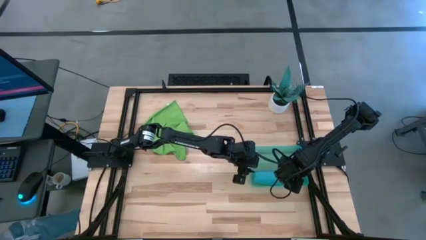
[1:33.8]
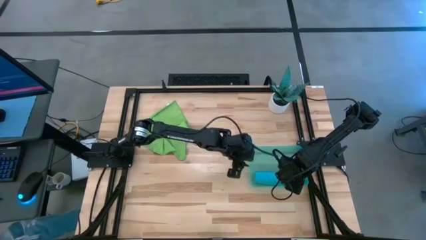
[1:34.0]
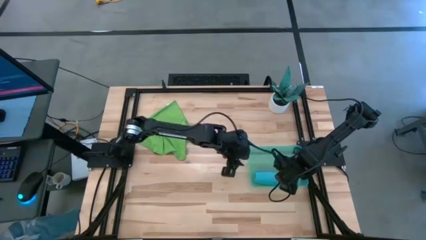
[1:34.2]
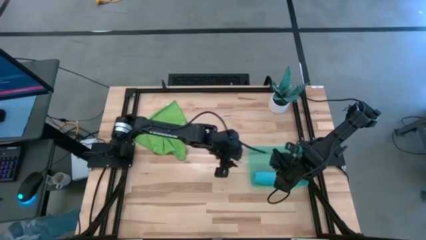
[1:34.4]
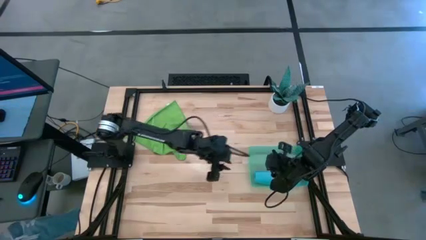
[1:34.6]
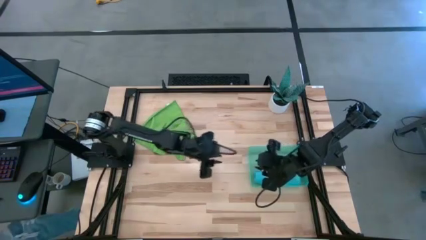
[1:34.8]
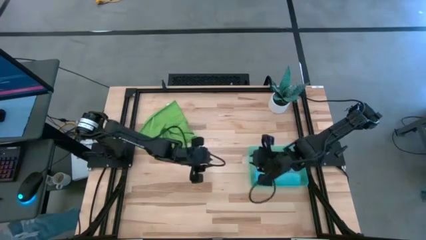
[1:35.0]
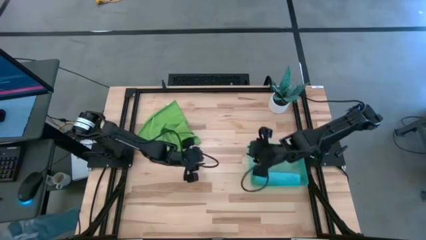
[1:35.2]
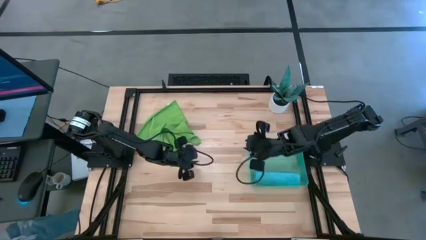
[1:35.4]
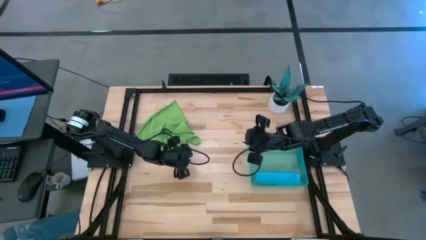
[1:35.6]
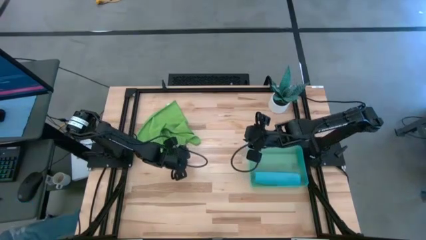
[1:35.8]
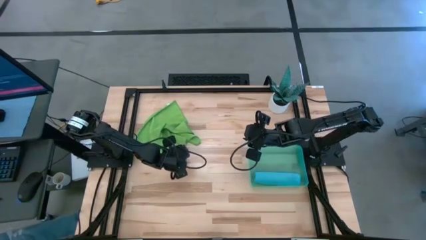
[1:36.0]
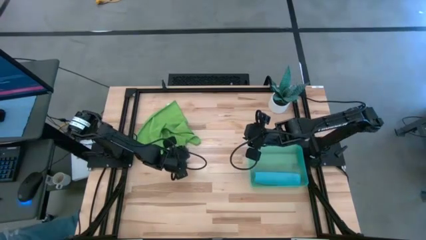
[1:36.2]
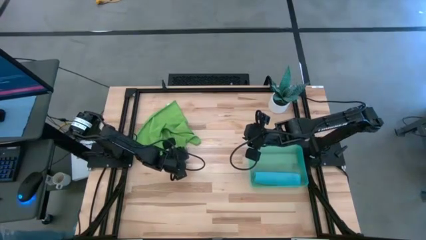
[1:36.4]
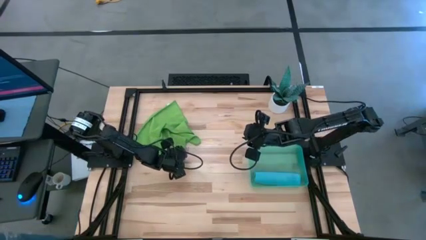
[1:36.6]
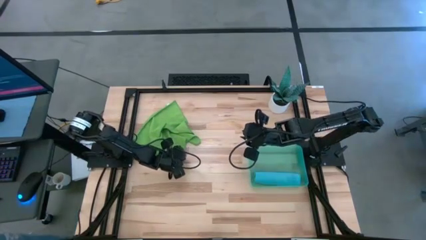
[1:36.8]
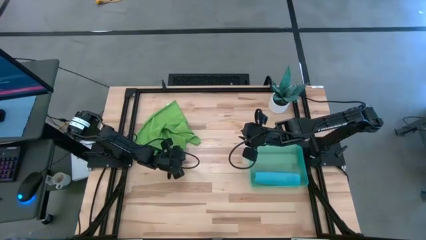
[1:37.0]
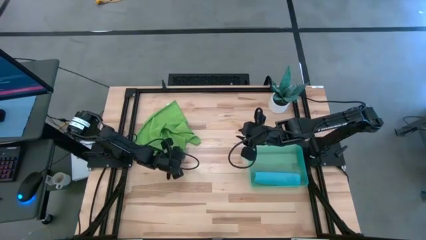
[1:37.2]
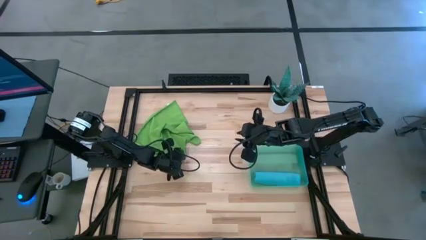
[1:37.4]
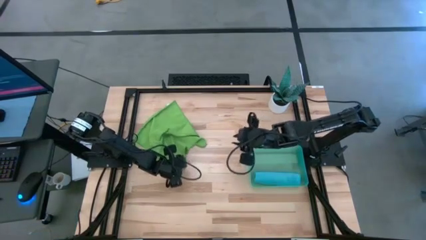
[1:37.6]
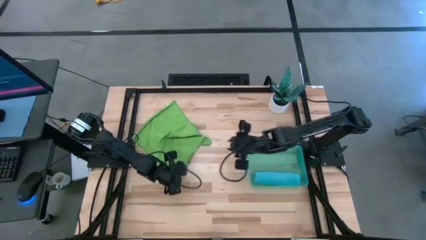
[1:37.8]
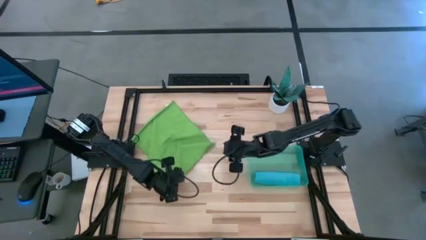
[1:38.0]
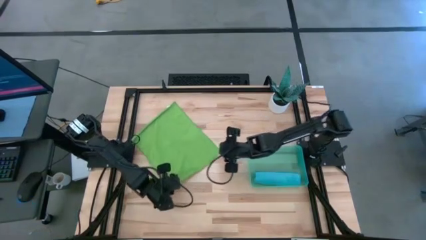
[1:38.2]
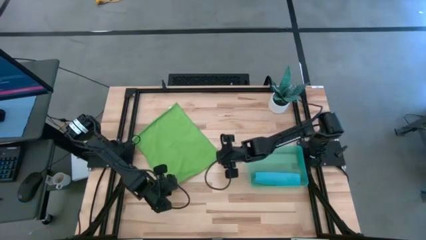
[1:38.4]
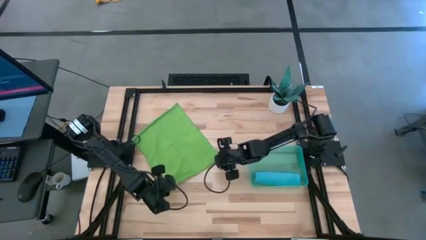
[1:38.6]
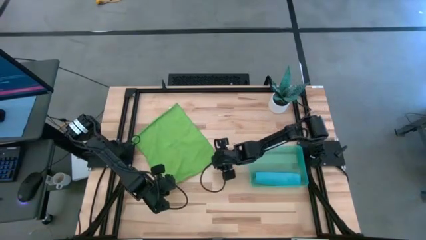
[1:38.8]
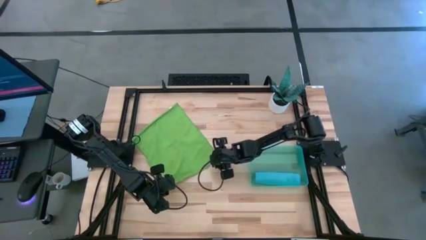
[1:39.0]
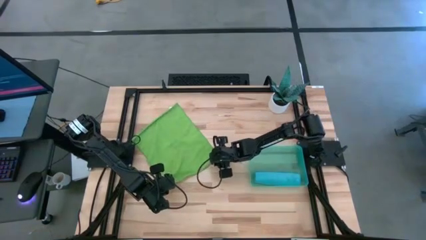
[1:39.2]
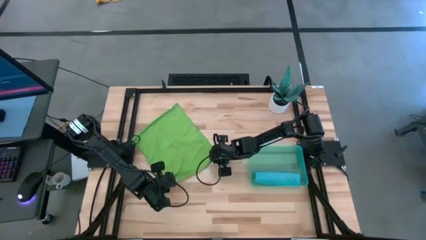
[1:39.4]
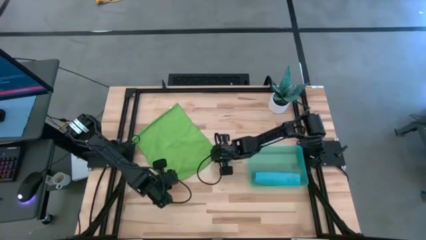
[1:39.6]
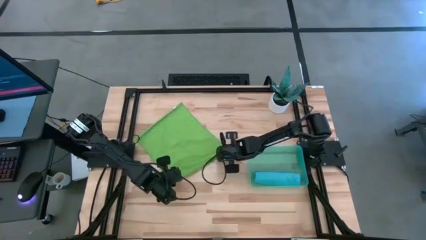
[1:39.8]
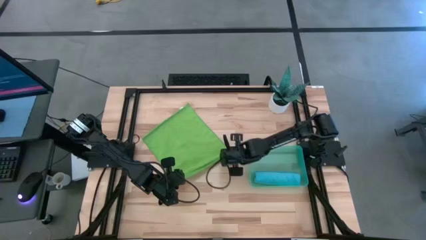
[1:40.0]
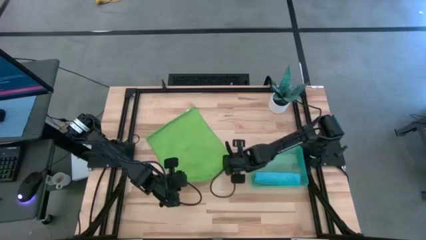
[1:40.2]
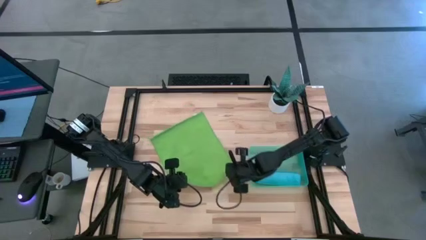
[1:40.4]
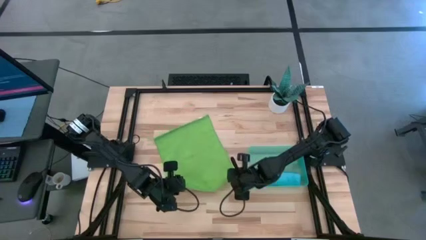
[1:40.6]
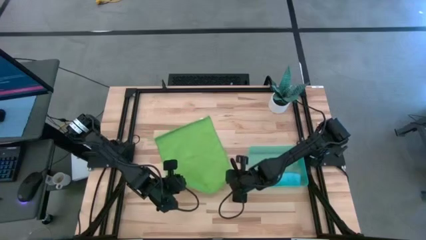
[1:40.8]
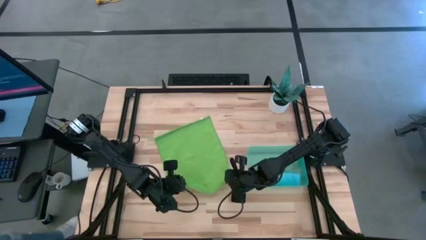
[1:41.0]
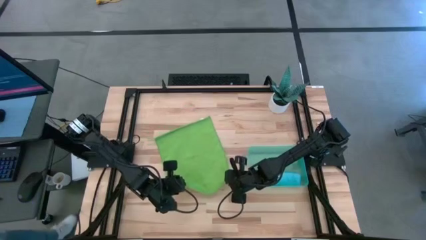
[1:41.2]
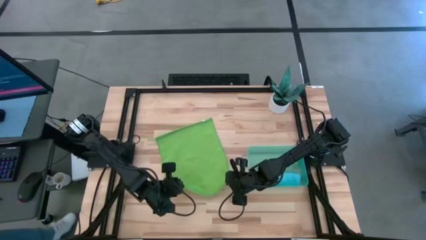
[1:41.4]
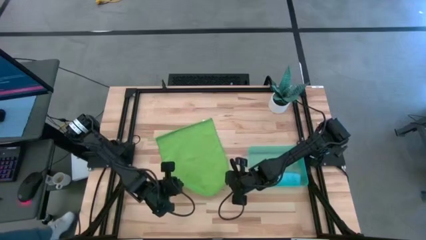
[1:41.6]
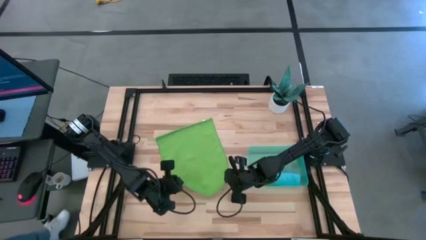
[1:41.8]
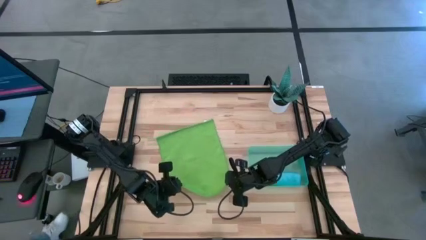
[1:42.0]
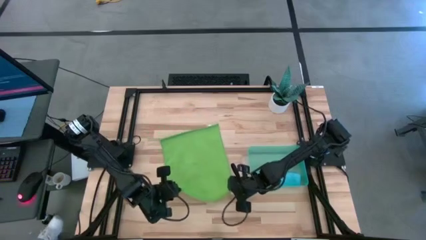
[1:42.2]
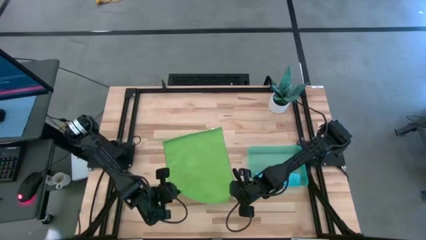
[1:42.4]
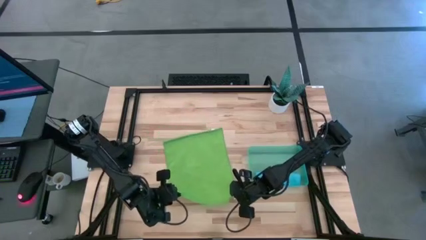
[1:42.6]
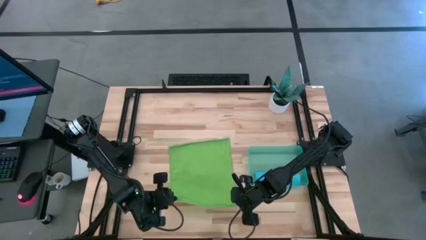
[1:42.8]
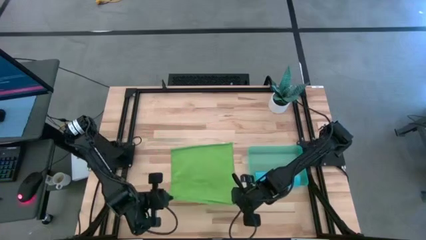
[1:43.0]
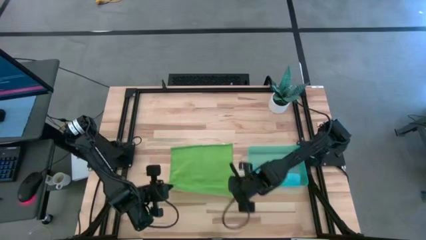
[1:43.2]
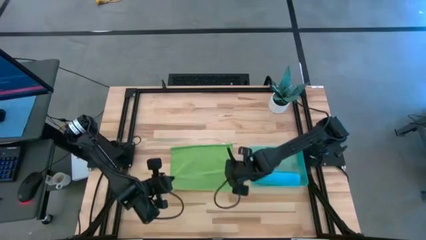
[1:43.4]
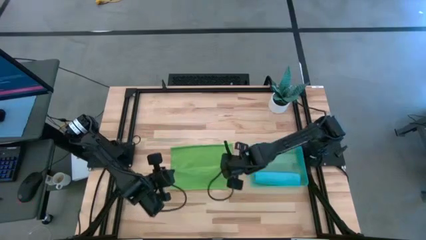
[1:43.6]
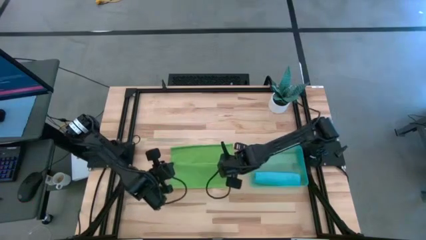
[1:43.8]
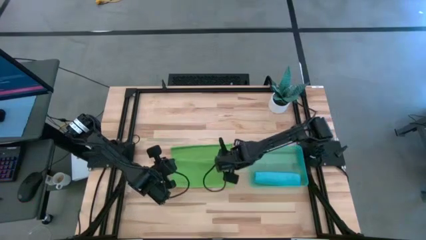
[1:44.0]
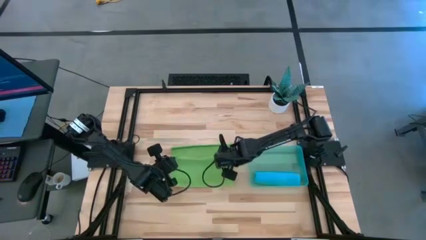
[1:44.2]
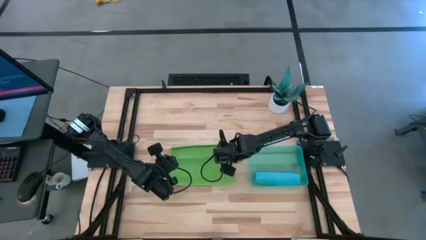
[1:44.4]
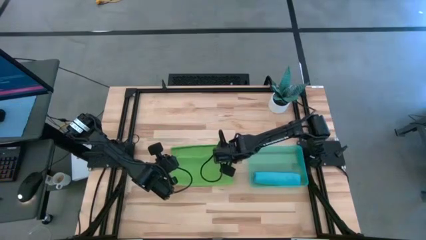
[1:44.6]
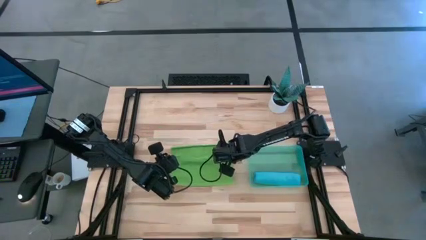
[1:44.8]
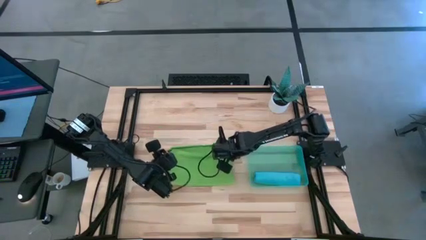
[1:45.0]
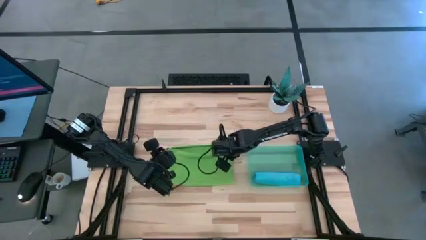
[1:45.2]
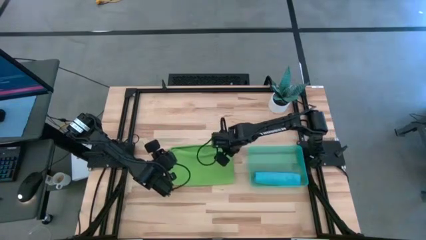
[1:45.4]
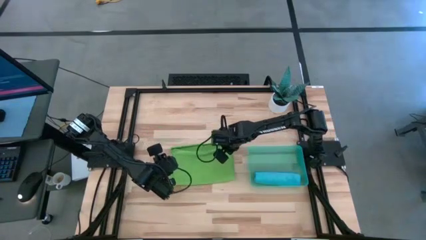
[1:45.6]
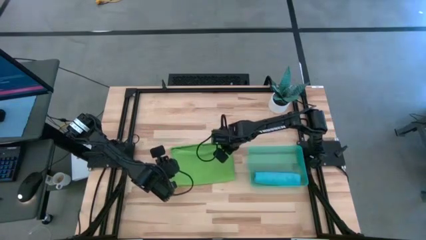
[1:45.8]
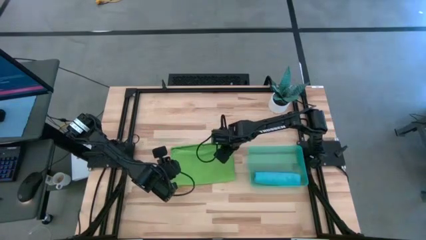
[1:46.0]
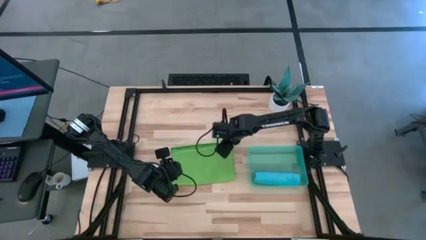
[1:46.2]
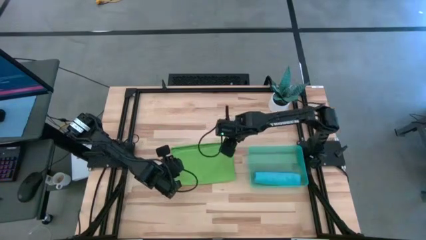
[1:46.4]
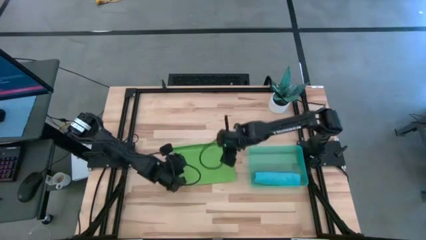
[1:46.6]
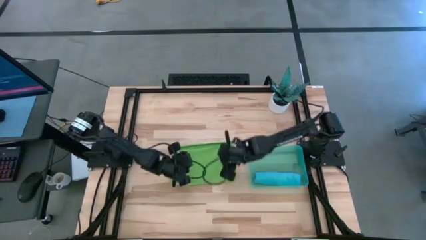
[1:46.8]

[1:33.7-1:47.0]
Task: Roll microfiber towels into tight, uniform cylinder then place into a basket
Fold the green microfiber towel

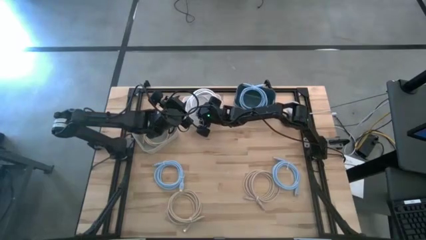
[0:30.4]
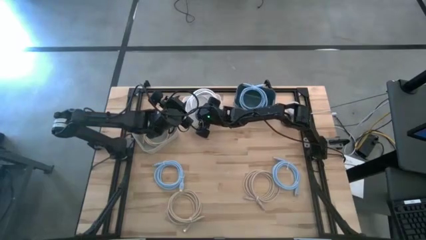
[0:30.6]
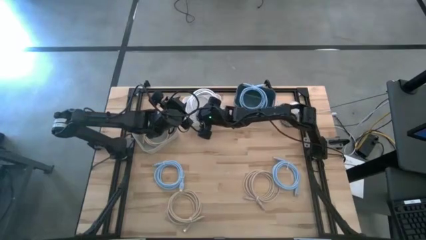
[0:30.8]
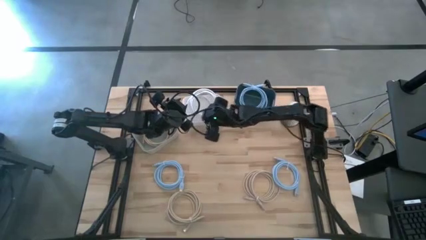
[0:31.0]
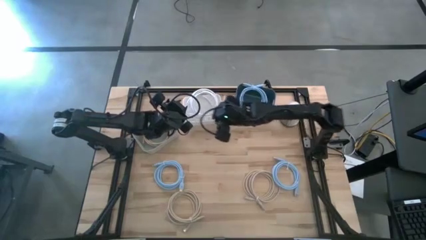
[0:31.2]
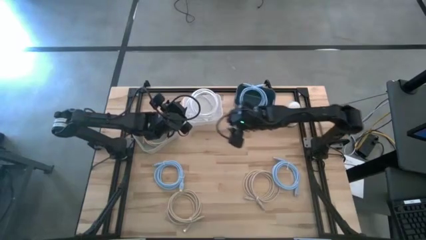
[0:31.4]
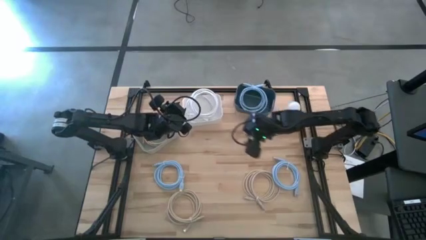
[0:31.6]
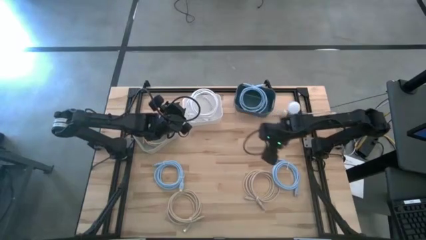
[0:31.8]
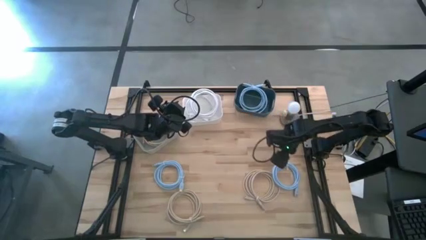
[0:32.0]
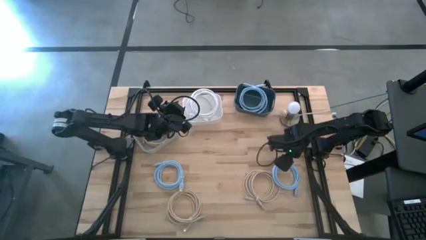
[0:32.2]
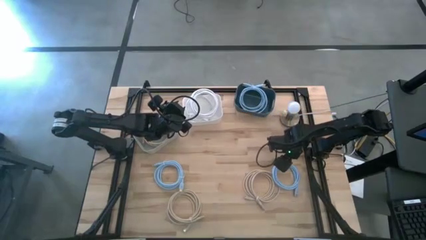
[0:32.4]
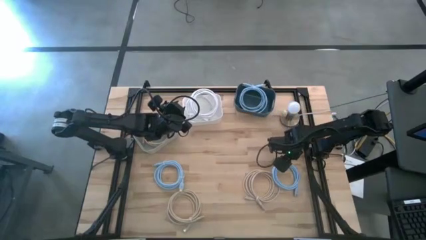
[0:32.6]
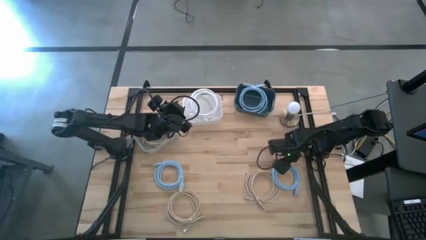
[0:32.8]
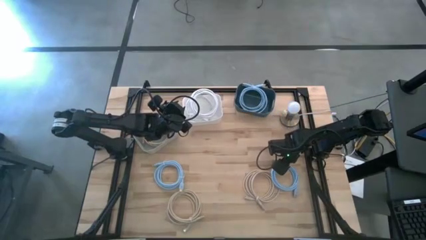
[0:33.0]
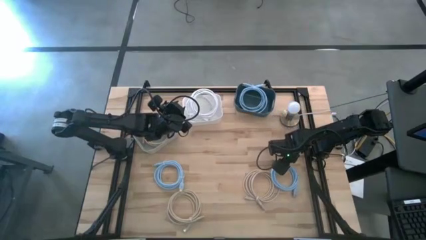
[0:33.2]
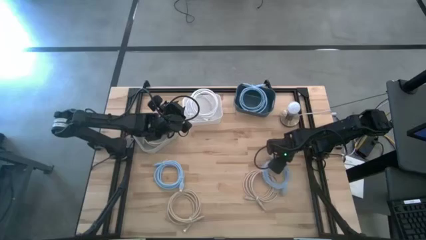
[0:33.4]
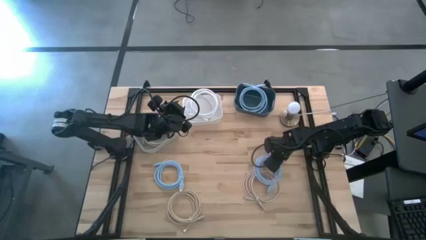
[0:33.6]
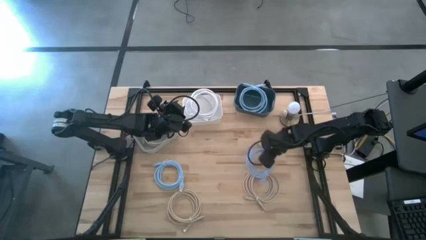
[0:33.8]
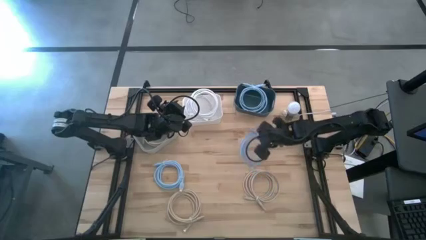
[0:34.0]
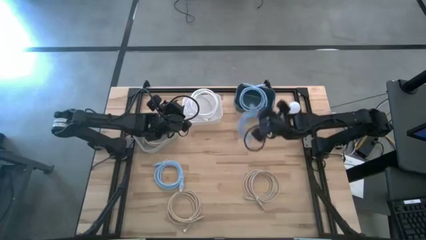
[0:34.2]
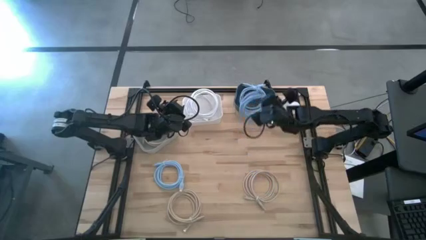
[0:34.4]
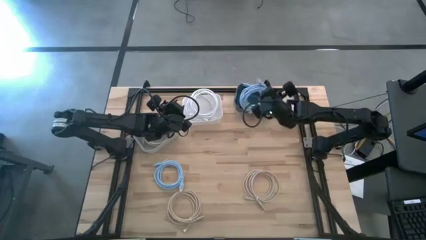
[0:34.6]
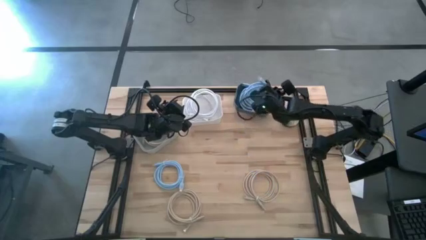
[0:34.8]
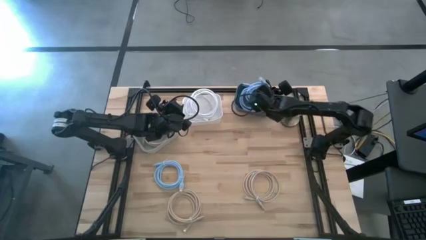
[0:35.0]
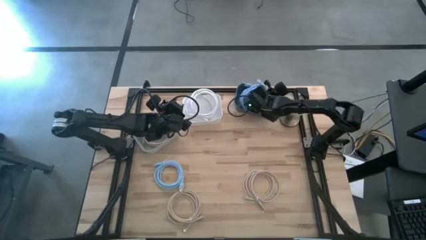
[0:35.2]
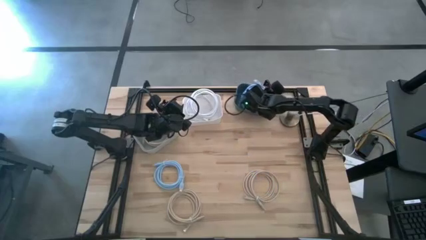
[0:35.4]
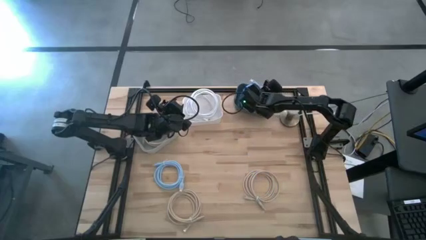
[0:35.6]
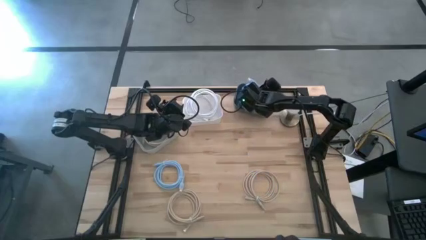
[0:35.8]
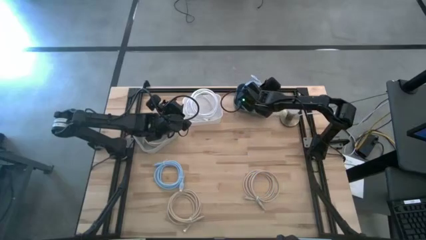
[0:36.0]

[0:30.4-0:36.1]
Task: Pick & Place USB Port
Put the right blue charger cable into the blue bin
